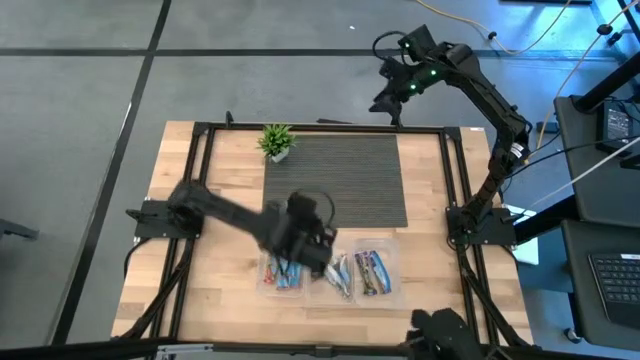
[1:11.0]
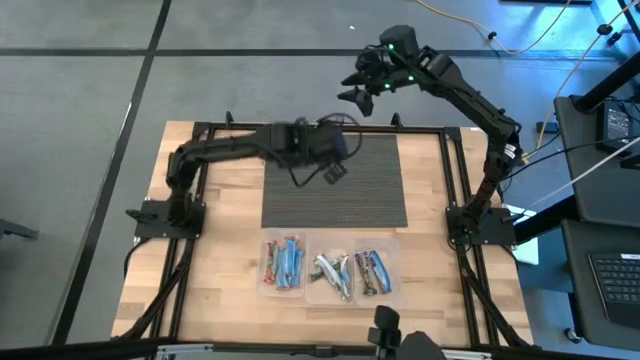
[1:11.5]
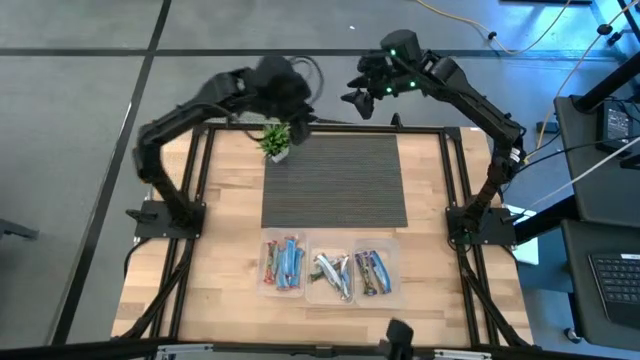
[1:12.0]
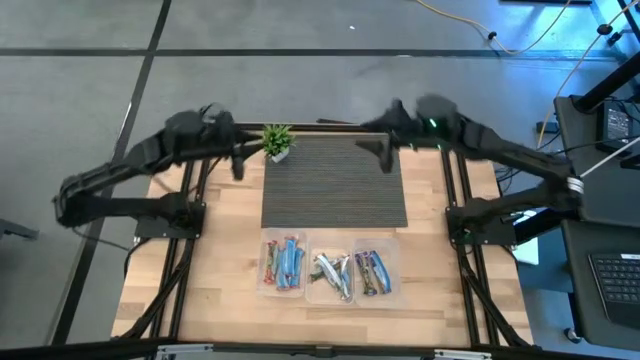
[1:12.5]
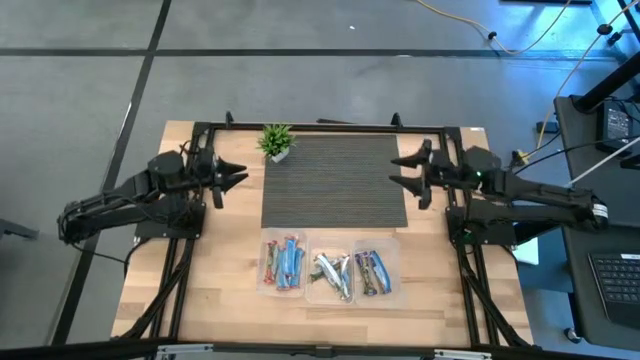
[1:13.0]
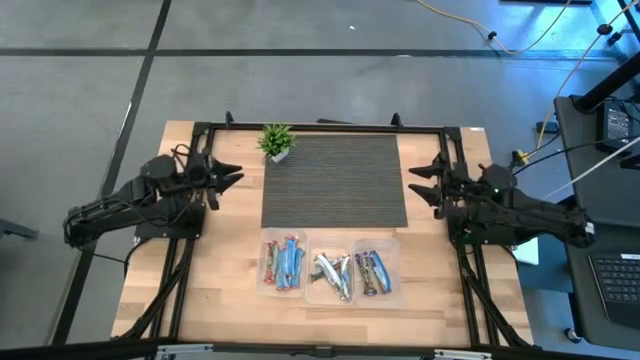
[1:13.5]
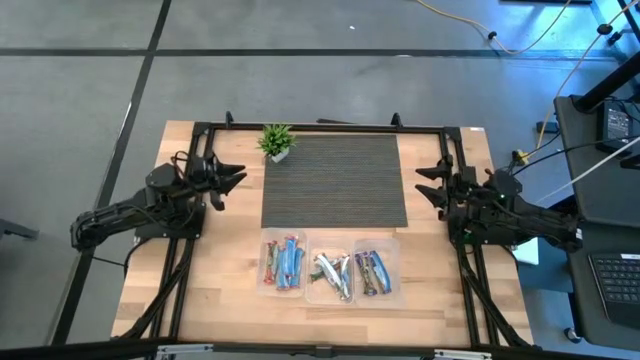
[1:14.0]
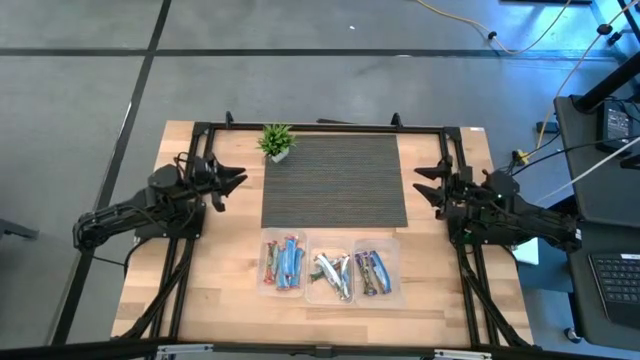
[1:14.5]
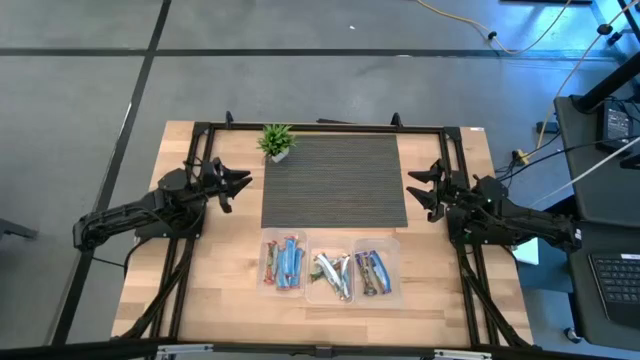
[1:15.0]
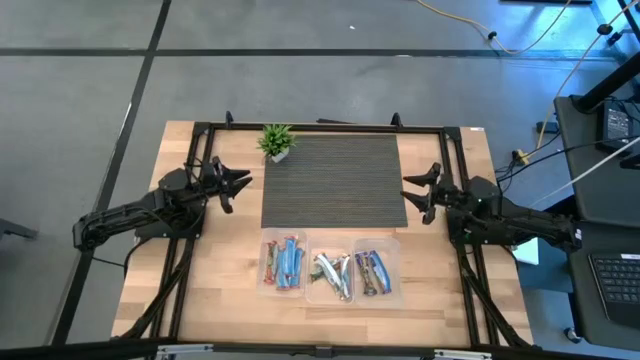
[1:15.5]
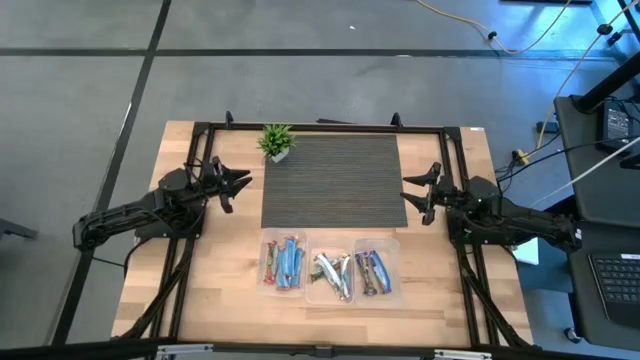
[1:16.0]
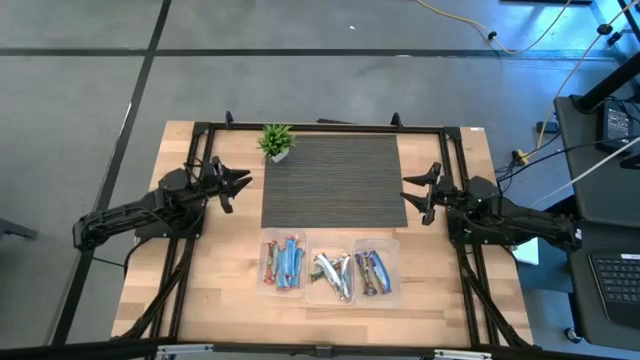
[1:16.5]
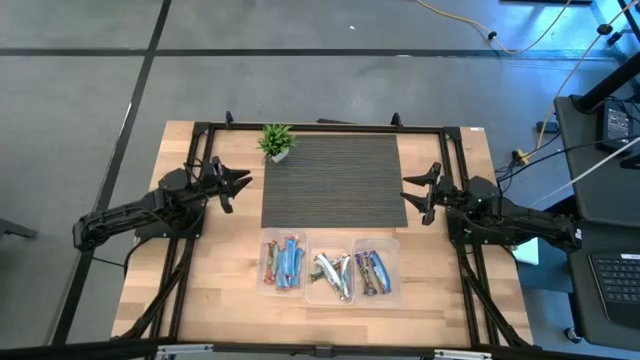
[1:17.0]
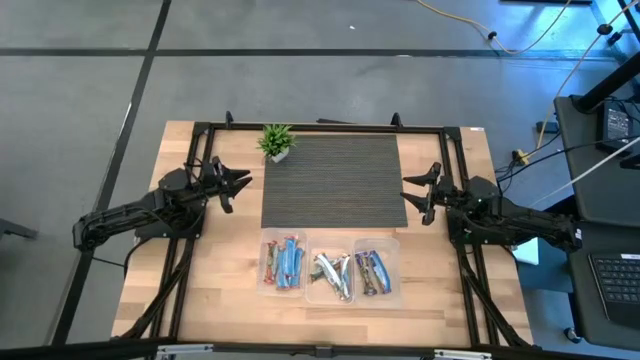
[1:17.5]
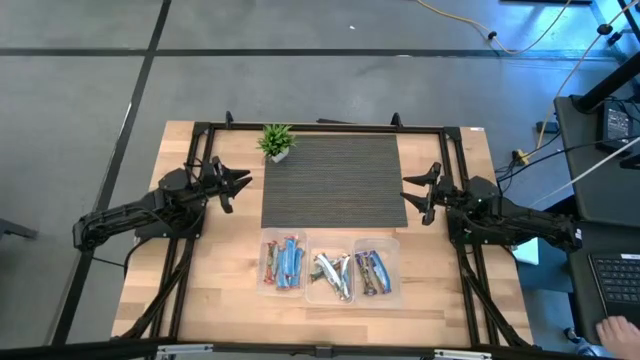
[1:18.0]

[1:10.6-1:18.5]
Task: Pick and place Granola Bars by type
Return to Home Position

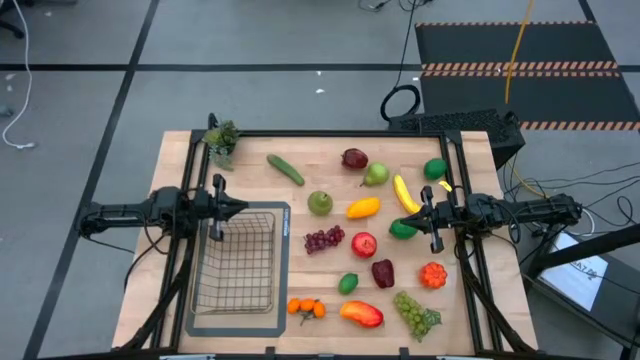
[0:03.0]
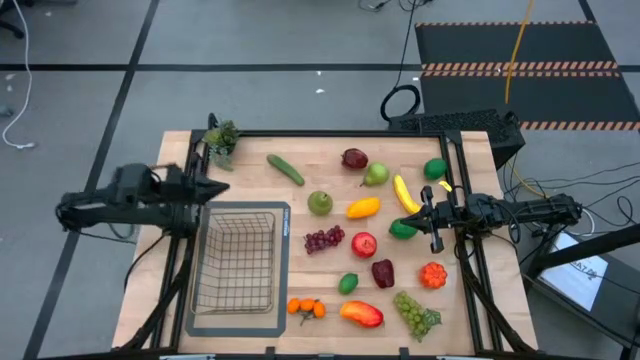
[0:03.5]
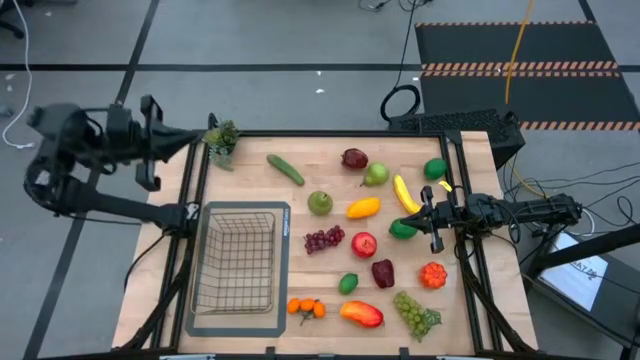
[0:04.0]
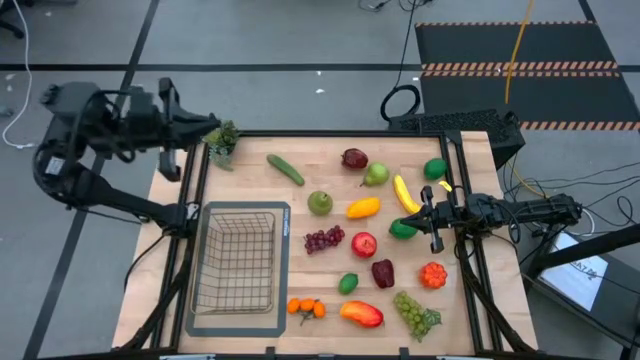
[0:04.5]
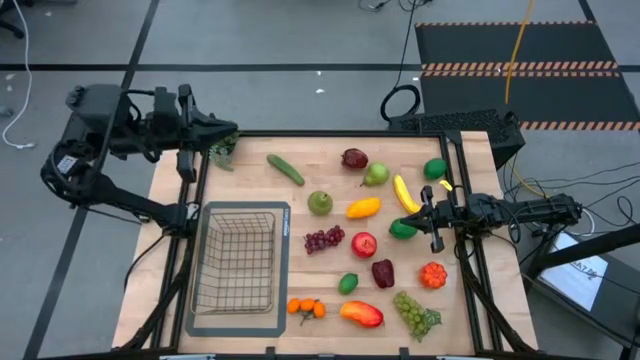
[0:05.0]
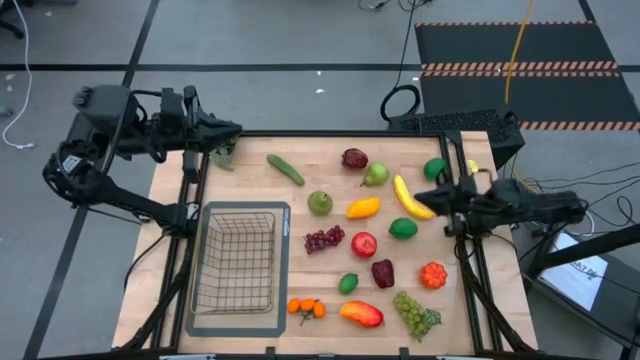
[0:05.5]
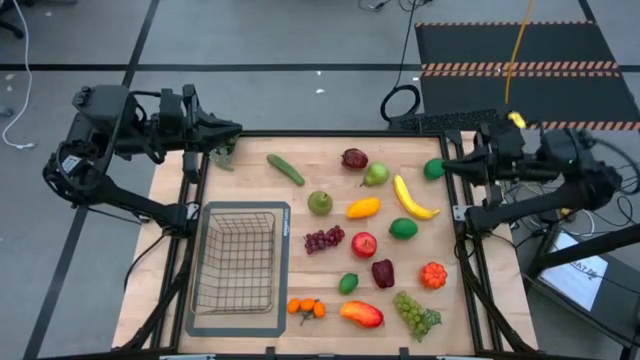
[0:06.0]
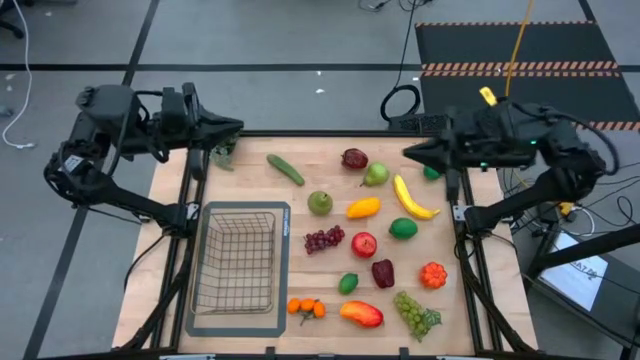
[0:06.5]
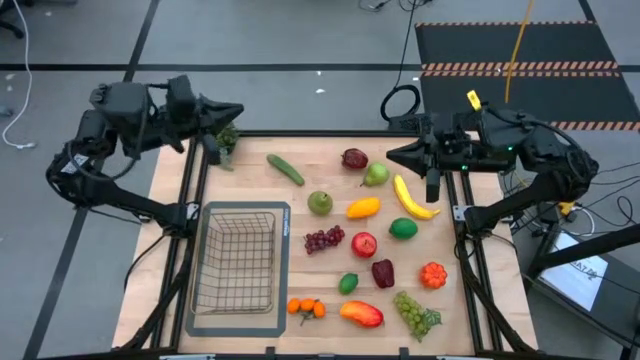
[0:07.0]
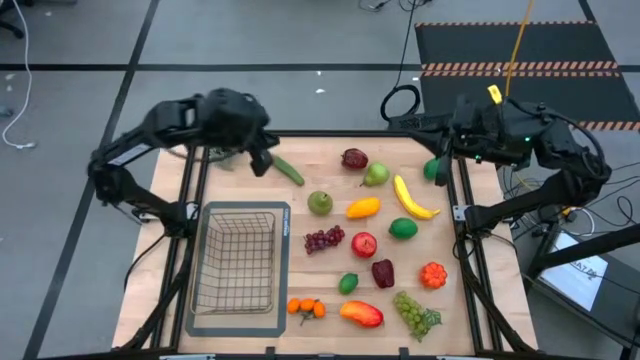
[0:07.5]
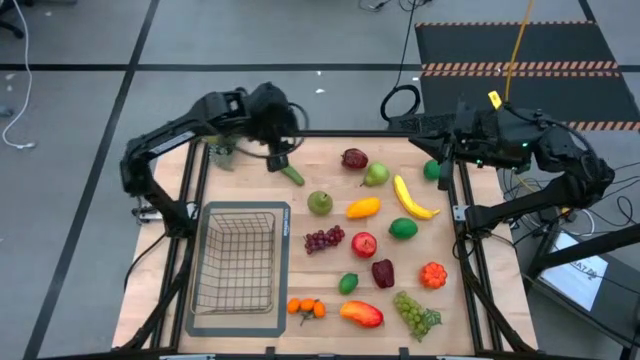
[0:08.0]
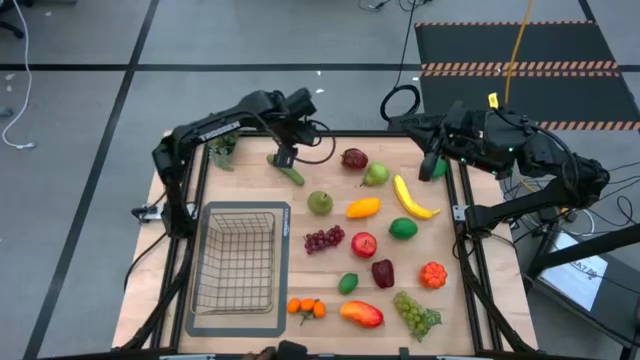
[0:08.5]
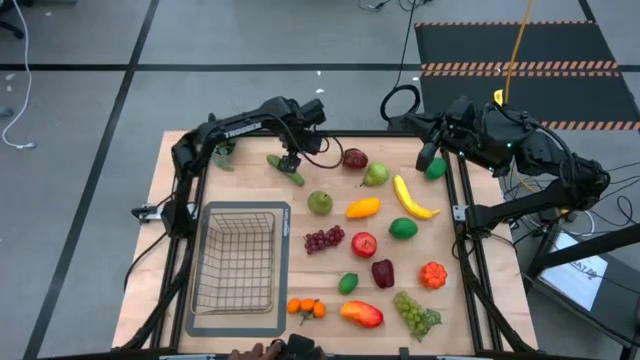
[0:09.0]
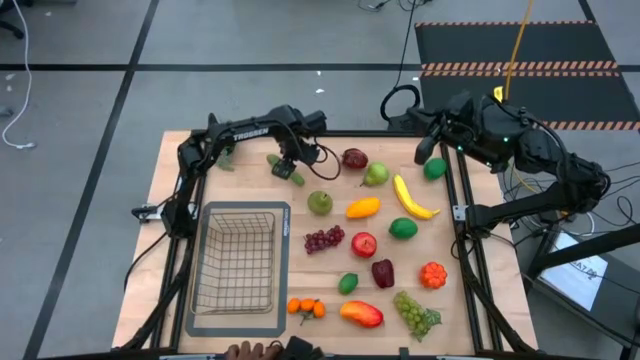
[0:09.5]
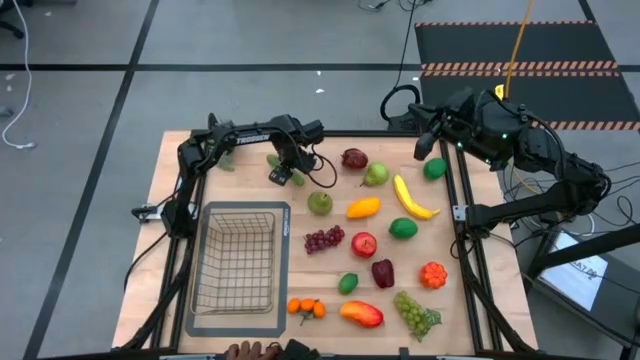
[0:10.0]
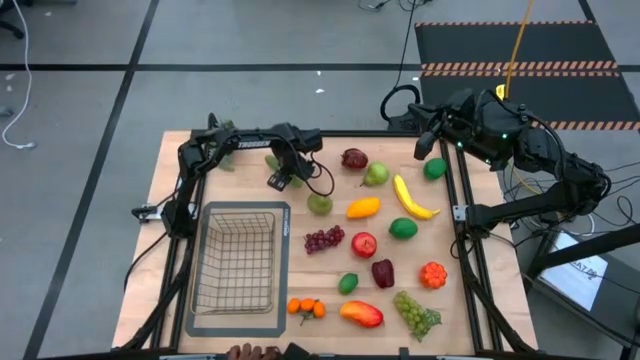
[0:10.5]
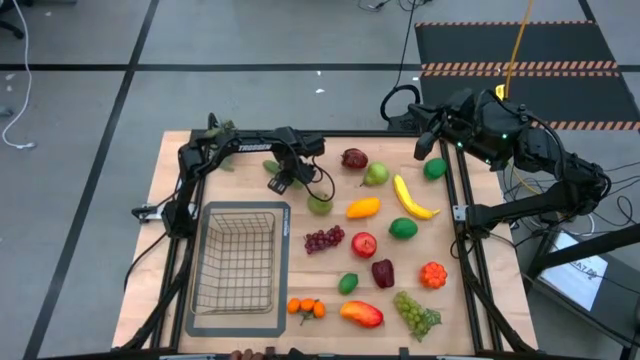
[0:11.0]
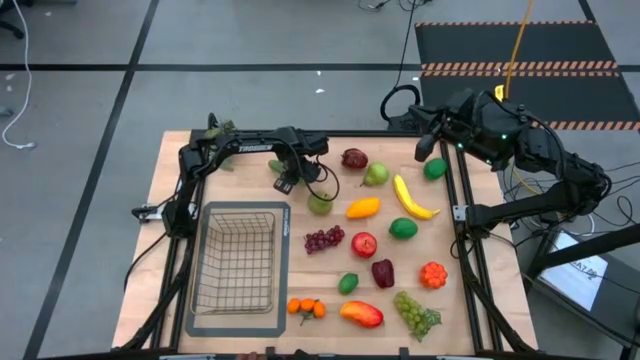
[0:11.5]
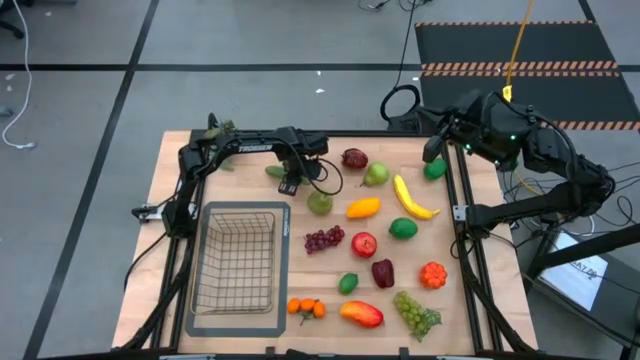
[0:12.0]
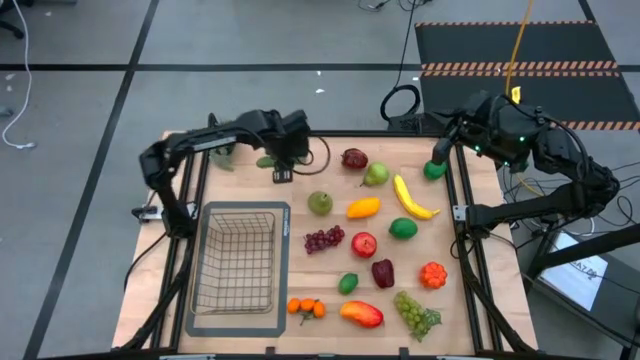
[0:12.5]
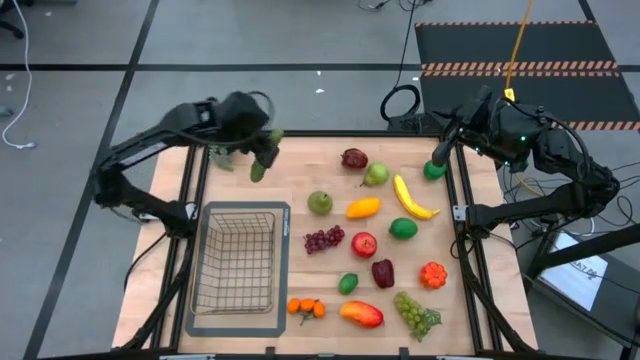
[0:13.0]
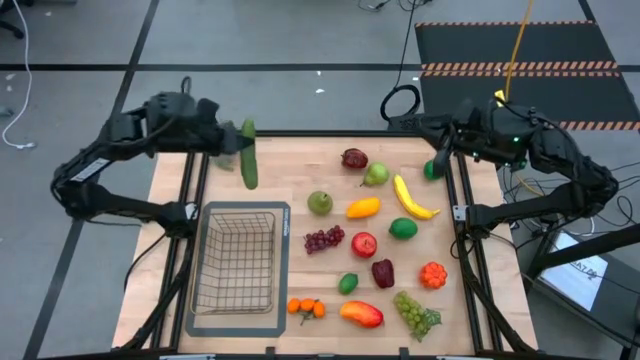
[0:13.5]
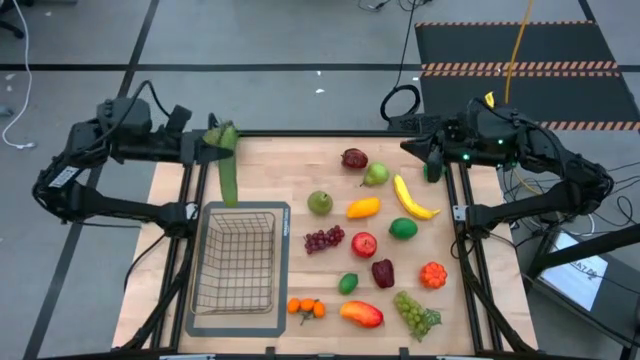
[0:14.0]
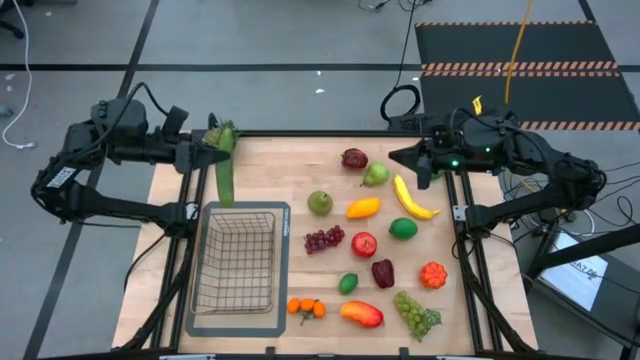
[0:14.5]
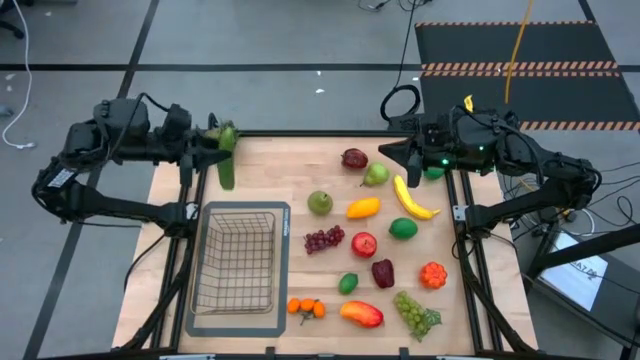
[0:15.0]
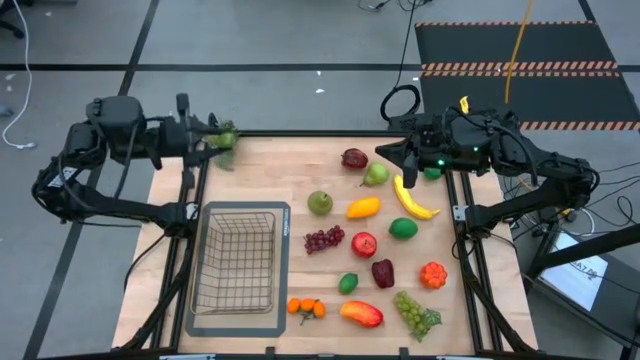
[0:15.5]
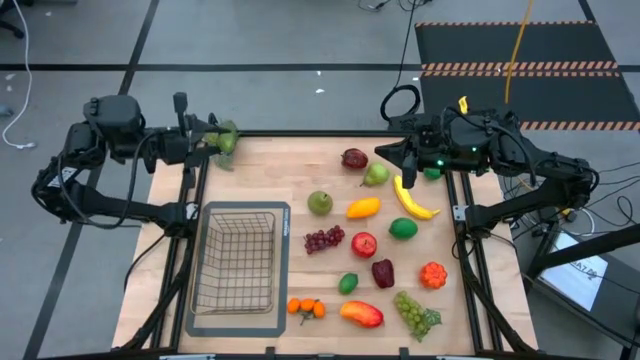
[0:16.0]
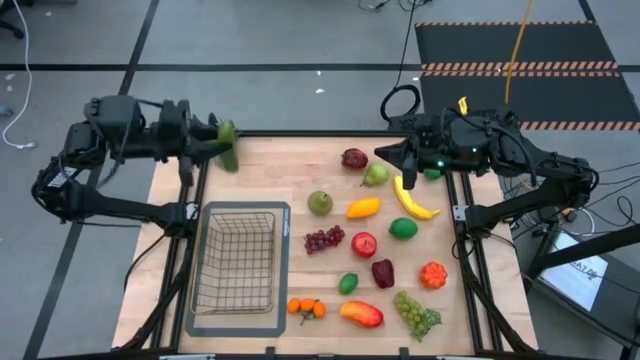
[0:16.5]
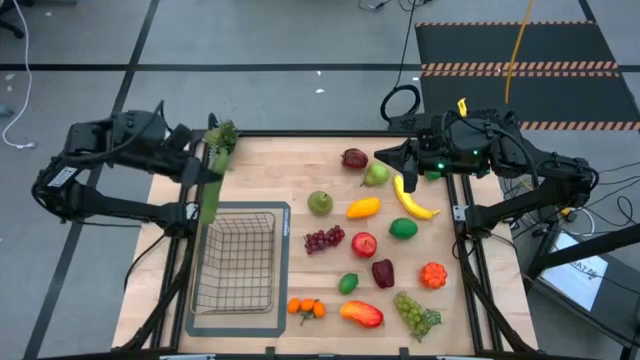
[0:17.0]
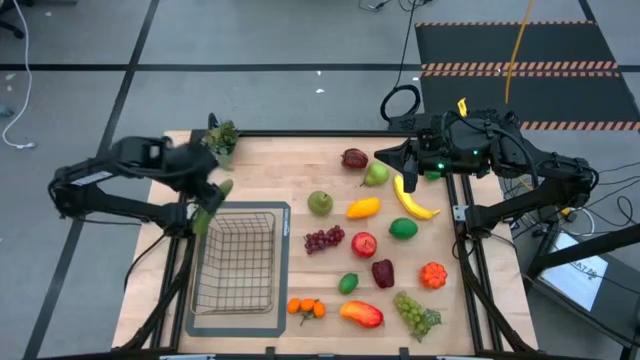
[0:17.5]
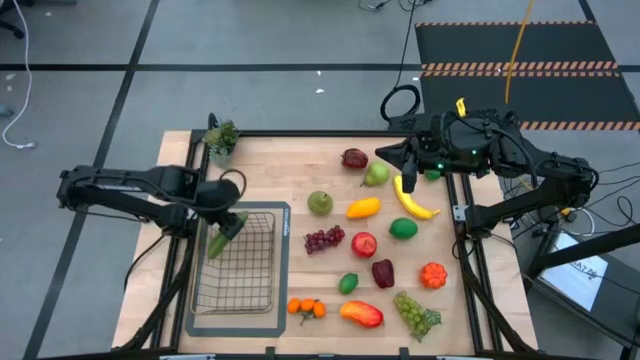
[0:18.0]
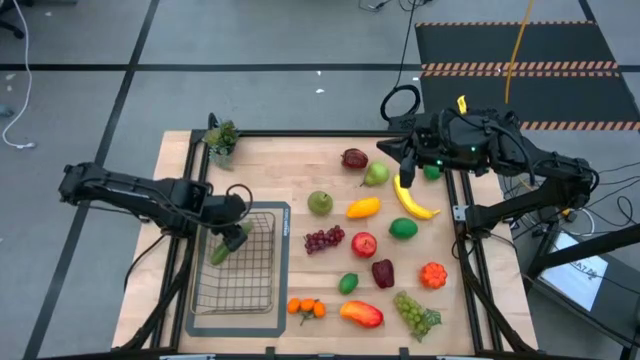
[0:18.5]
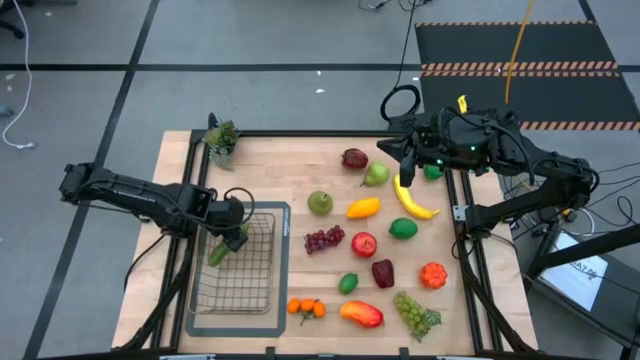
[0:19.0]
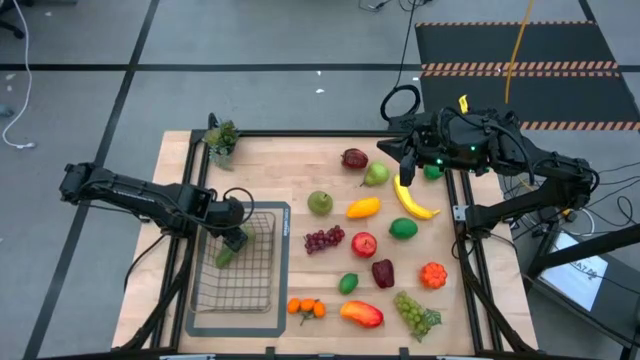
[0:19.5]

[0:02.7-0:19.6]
Task: Build produce basket
Put the green cucumber into the wire basket
